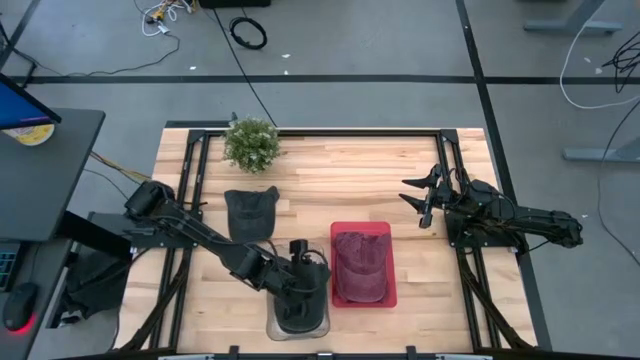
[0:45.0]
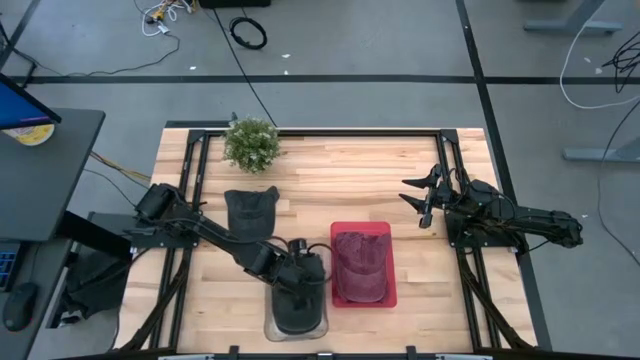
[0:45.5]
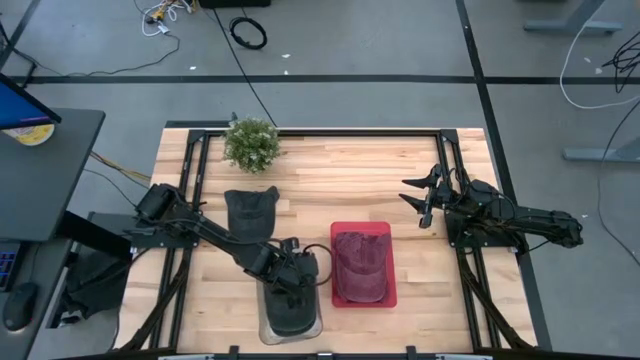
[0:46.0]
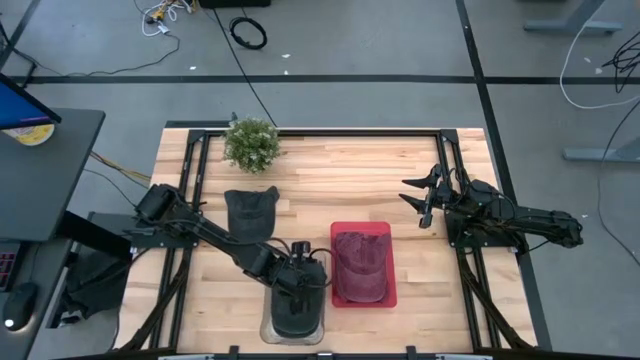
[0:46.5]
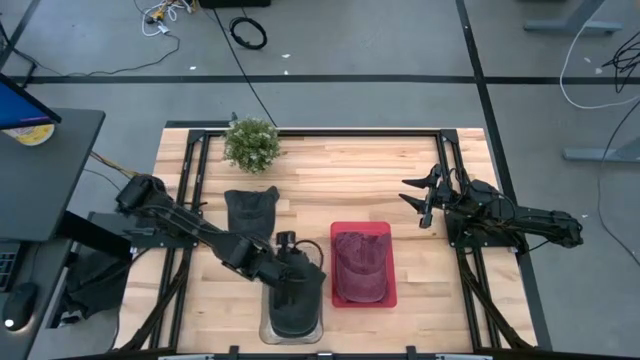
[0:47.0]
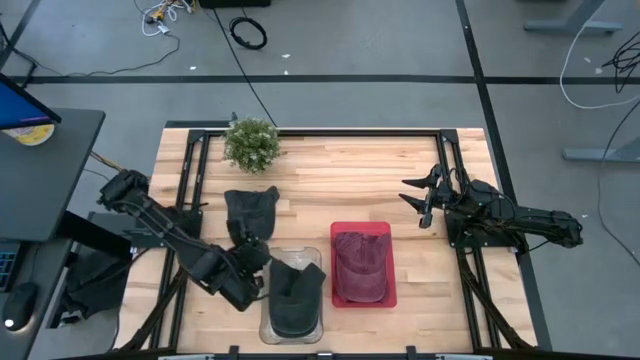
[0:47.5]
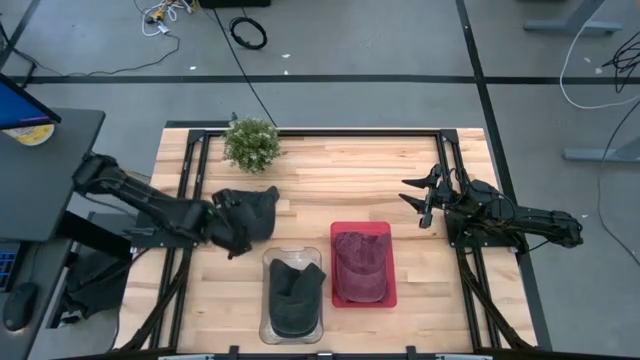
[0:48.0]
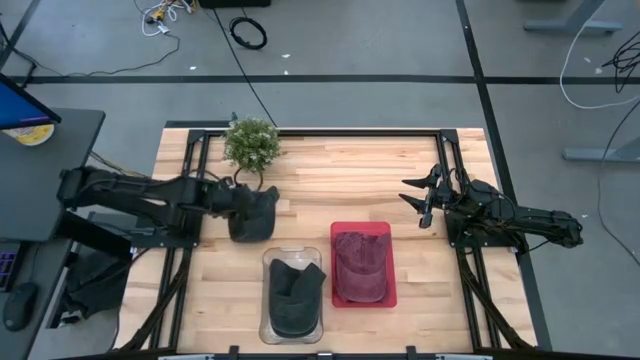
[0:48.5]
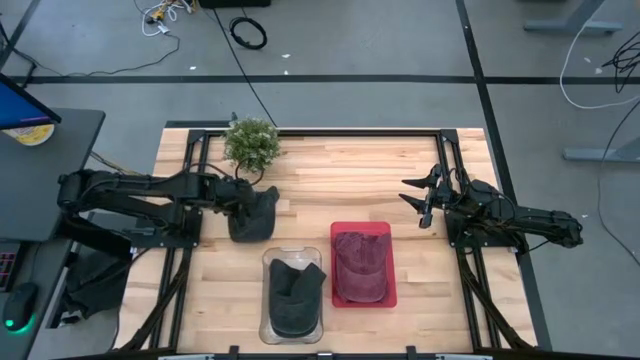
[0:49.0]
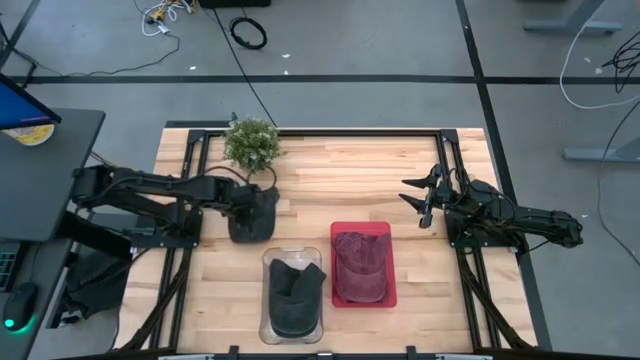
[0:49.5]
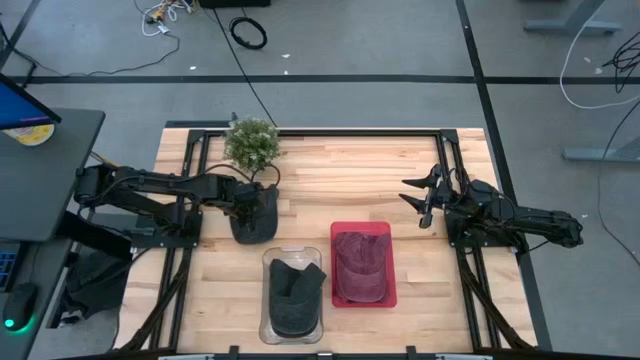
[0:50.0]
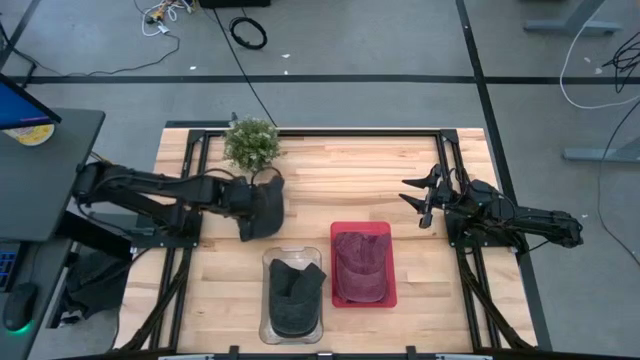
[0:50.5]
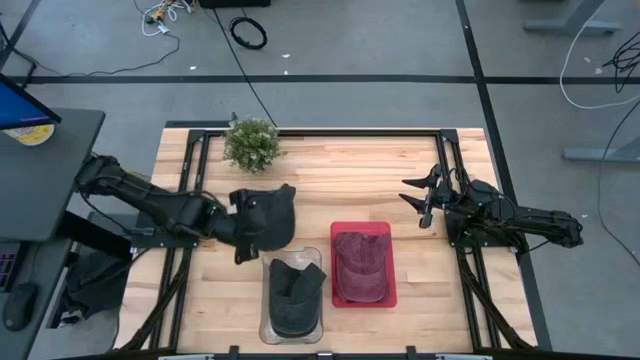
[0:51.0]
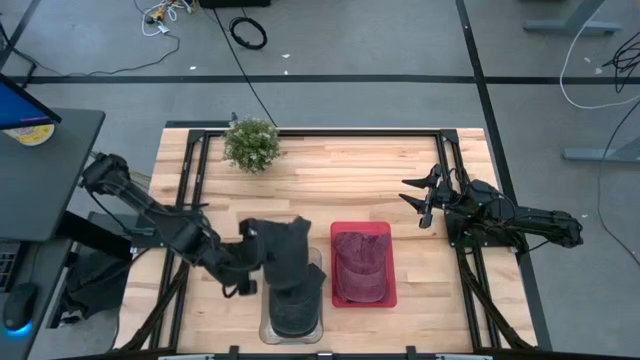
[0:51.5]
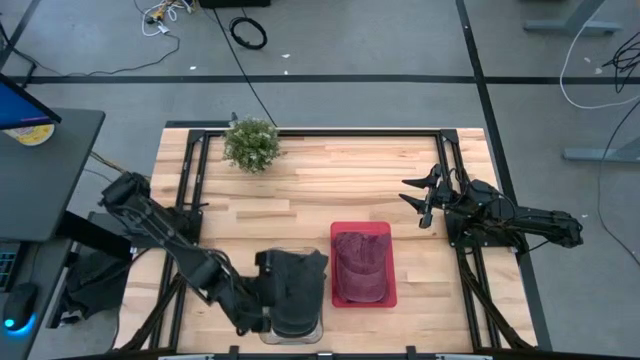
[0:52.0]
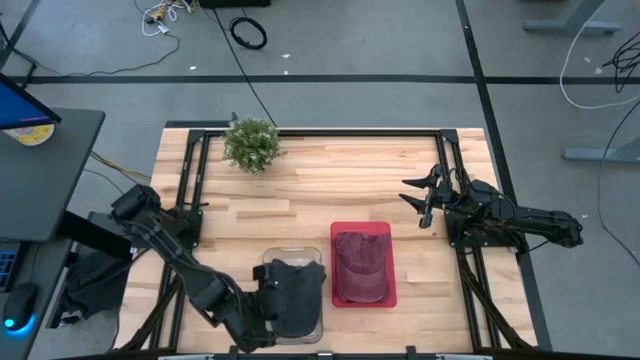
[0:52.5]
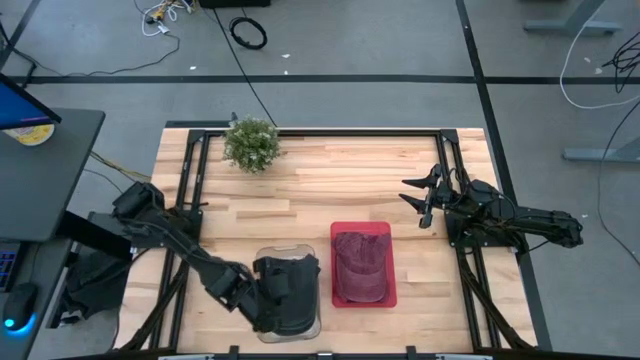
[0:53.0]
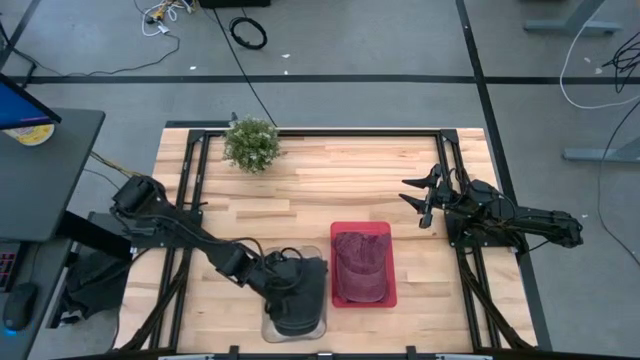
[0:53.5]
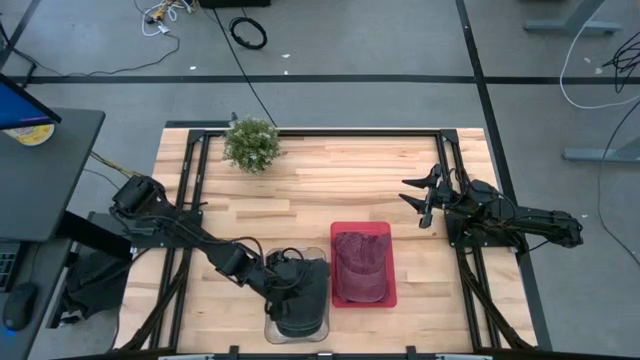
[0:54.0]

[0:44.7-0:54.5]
Task: Pick & Place hat
Put the black cap into the transparent bin

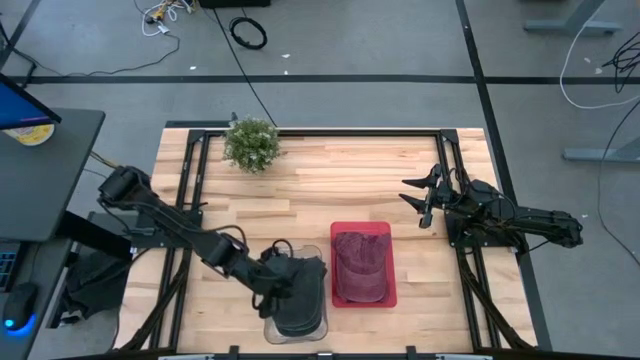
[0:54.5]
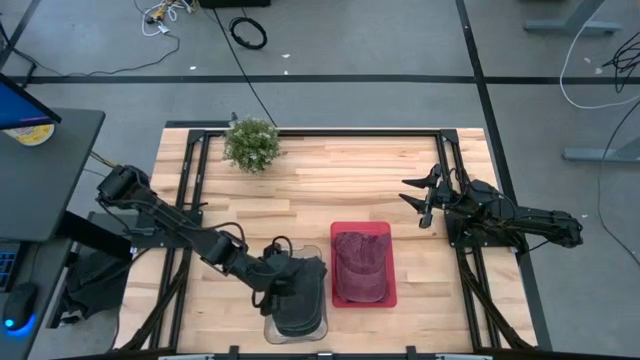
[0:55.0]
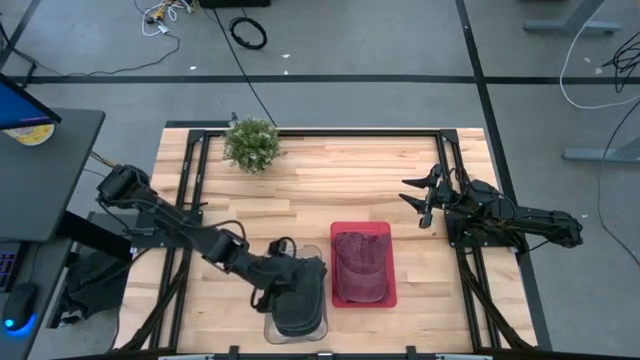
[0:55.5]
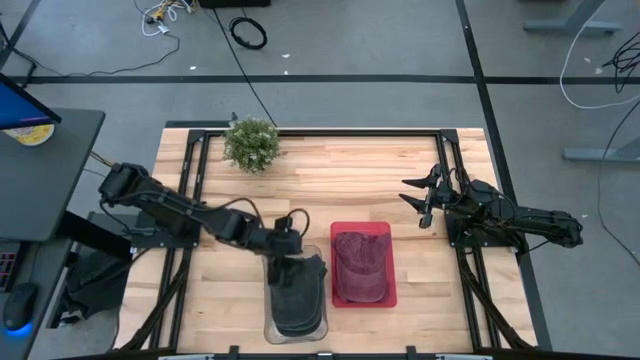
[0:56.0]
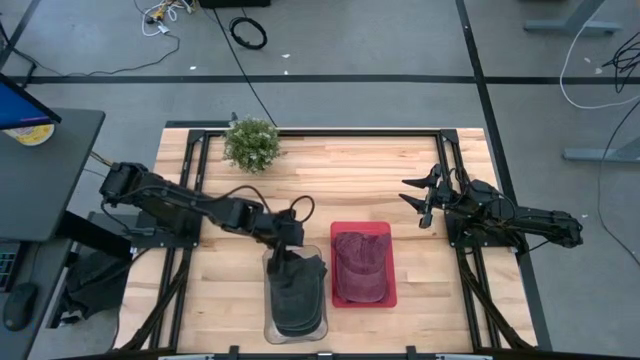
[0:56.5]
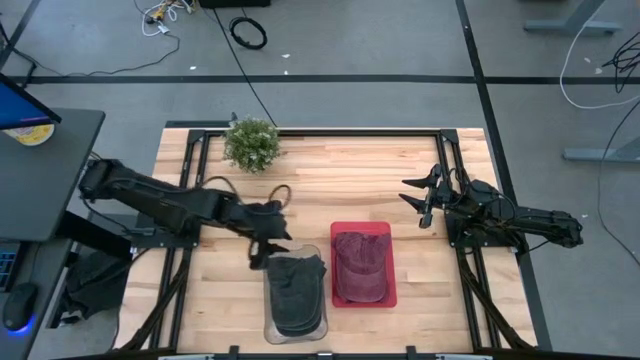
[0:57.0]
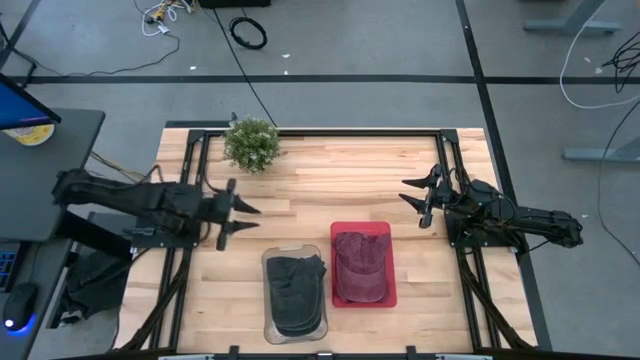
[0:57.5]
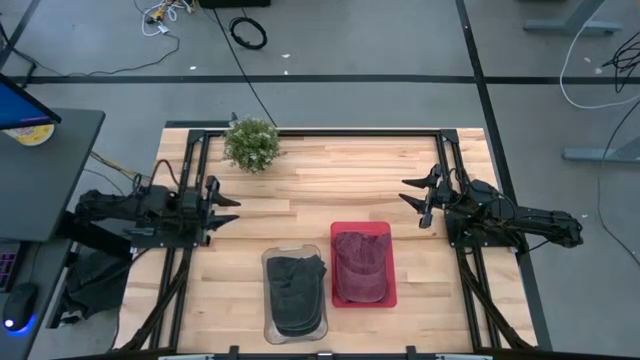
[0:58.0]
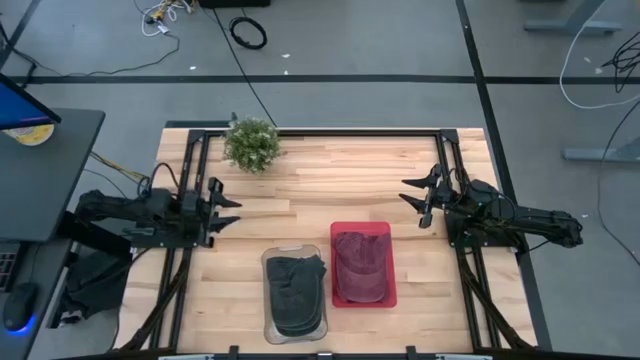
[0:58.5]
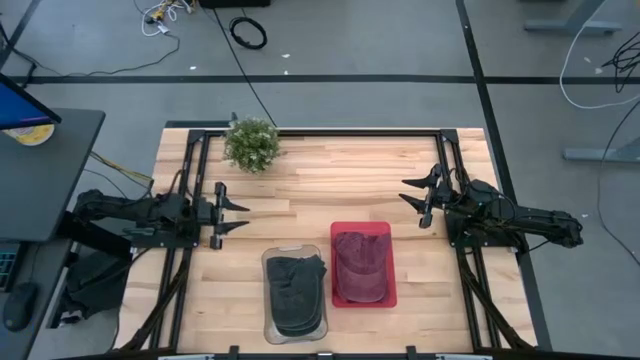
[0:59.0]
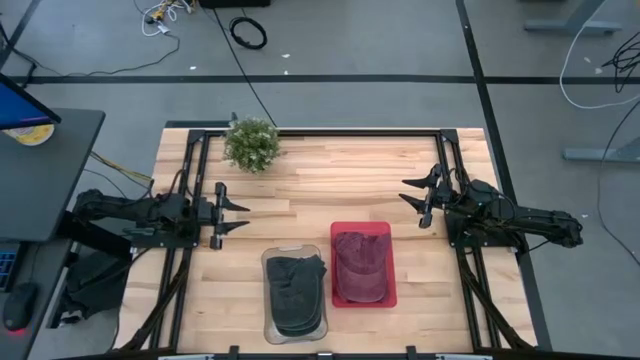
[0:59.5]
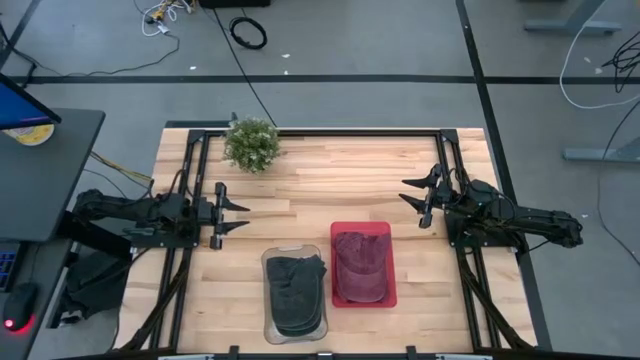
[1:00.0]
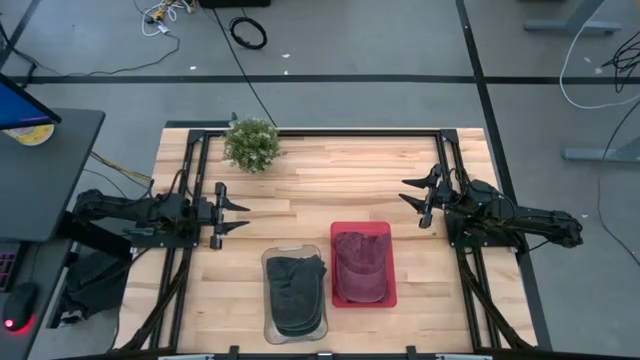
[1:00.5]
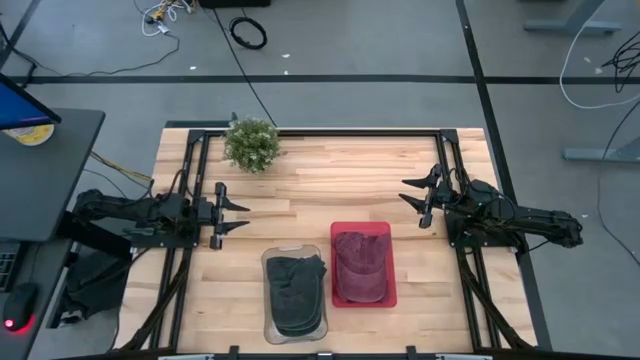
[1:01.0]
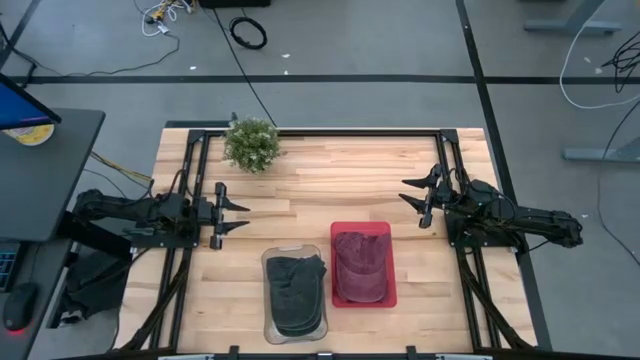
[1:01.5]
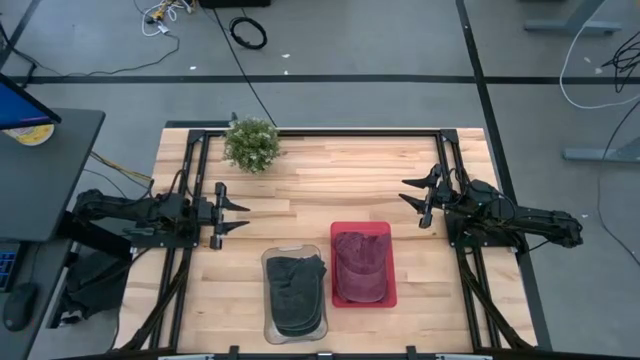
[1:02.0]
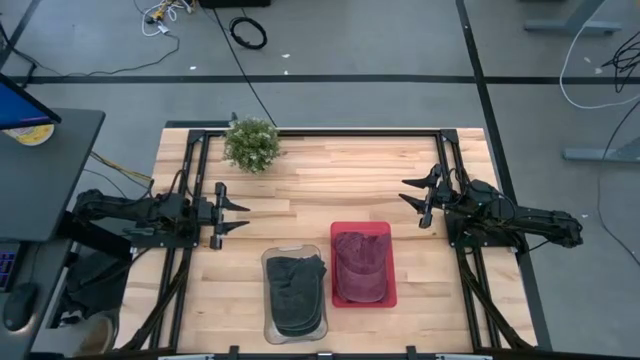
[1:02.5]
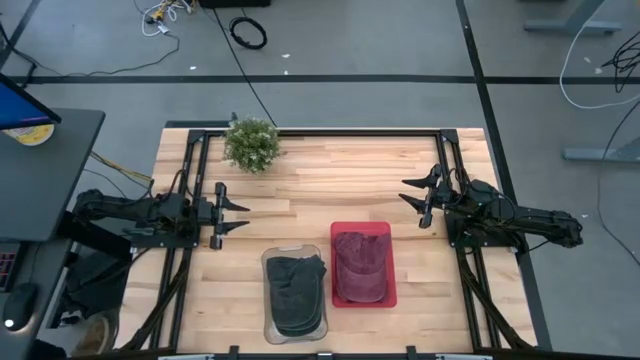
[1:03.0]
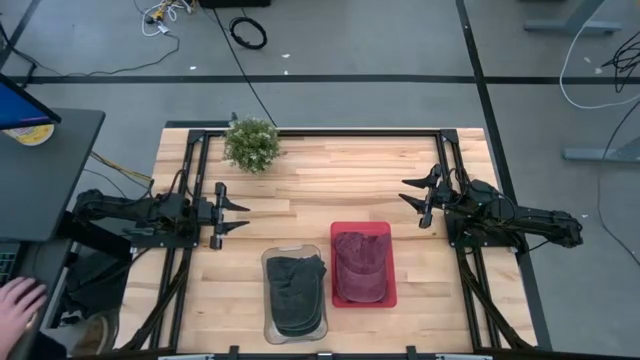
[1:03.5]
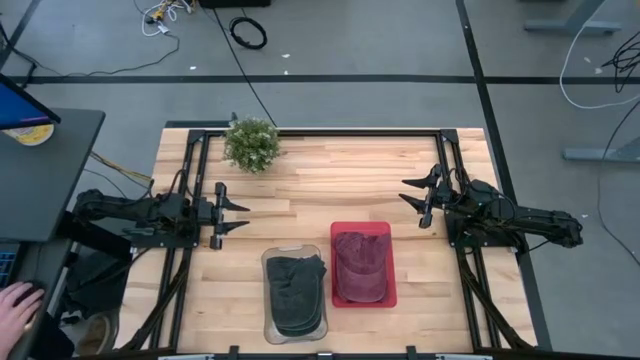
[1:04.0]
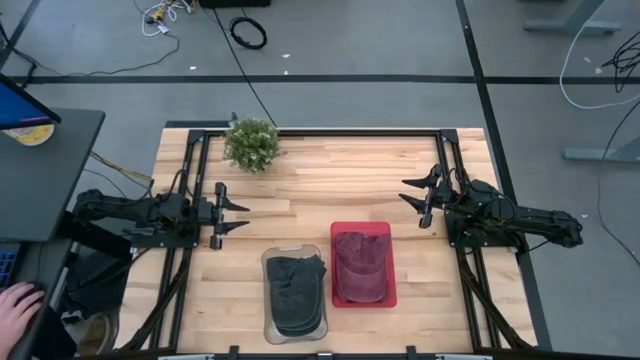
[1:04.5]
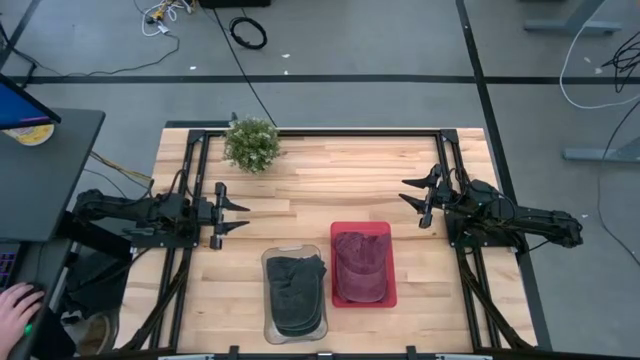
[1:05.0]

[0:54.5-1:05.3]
Return to Home Position

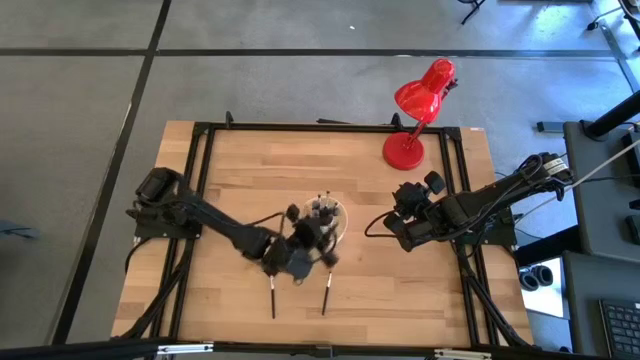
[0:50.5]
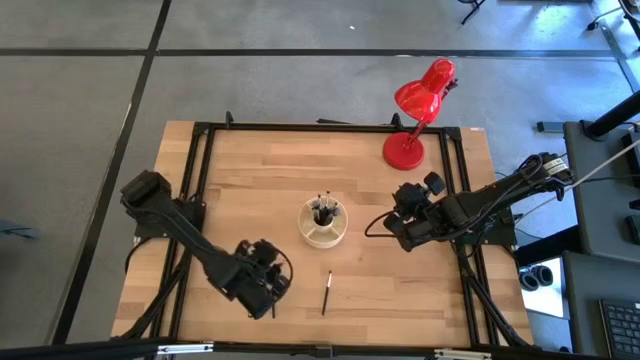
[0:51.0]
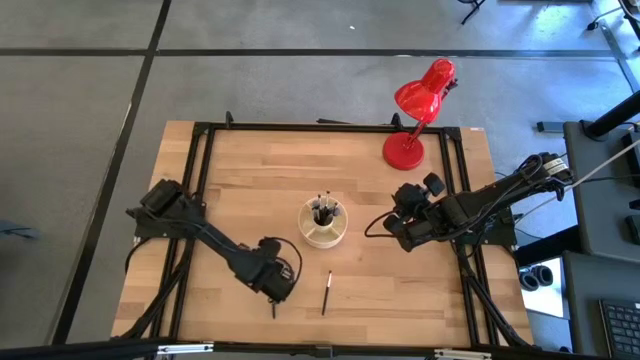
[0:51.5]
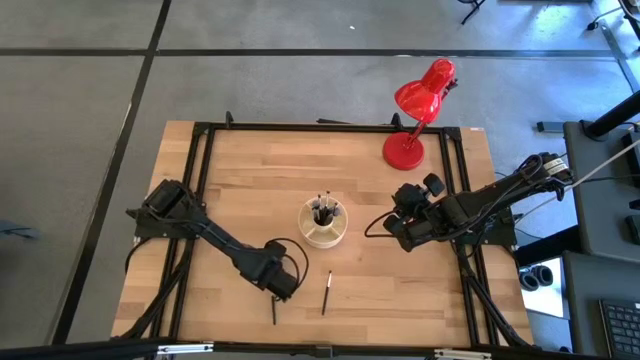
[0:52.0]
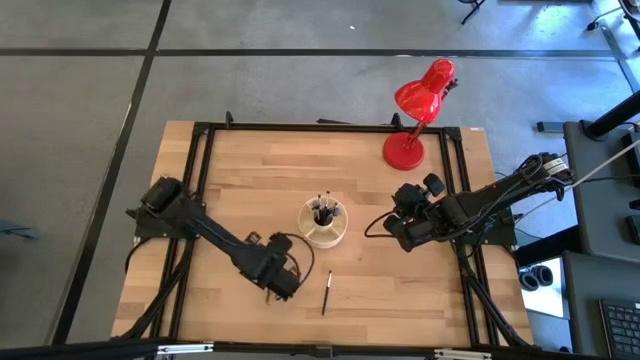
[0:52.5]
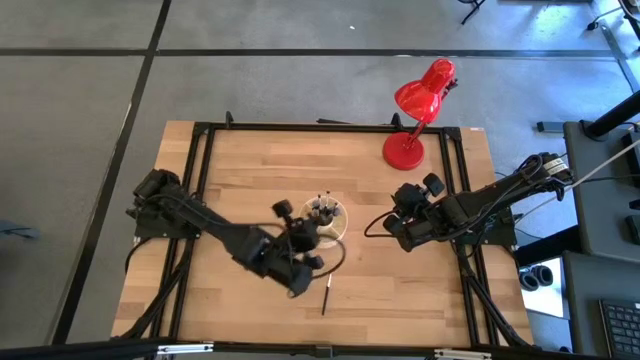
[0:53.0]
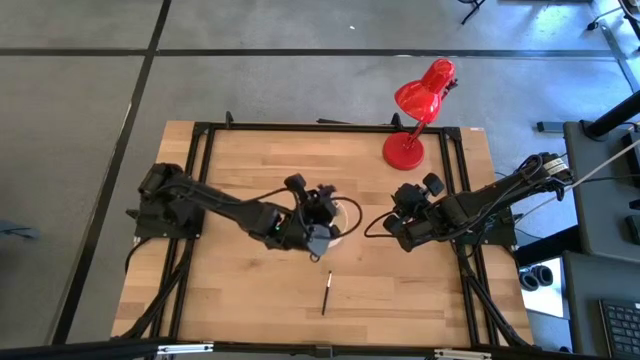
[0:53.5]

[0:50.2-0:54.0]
Task: Put items in baskets/containers
Put the black highlighter brush into the white brush holder
